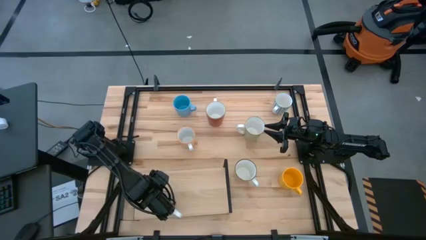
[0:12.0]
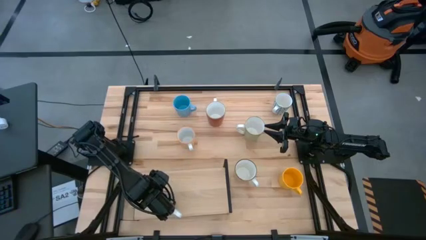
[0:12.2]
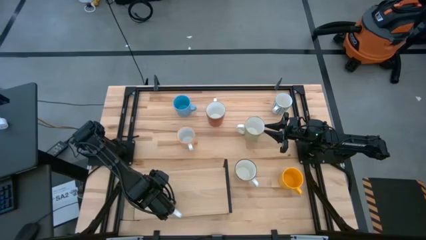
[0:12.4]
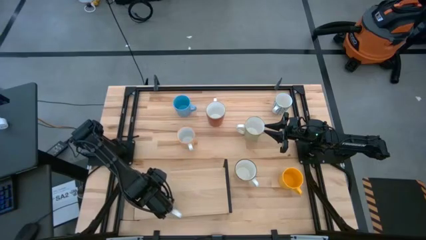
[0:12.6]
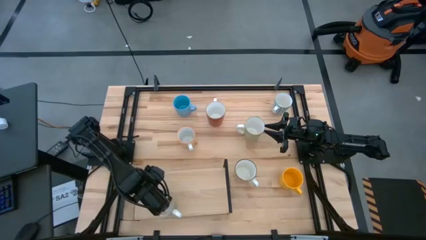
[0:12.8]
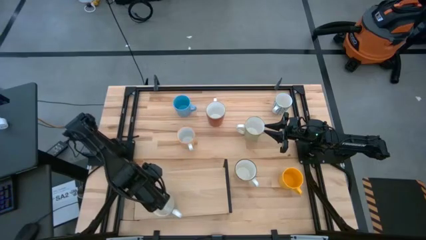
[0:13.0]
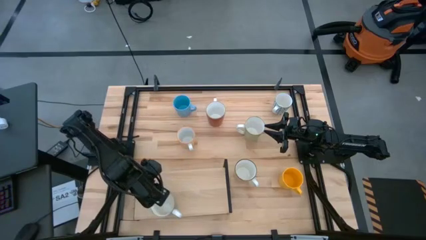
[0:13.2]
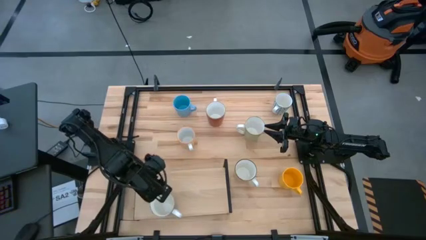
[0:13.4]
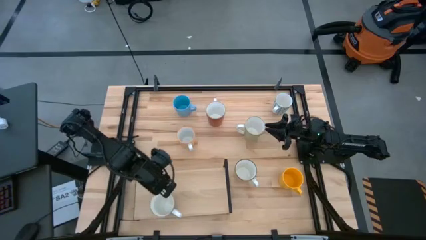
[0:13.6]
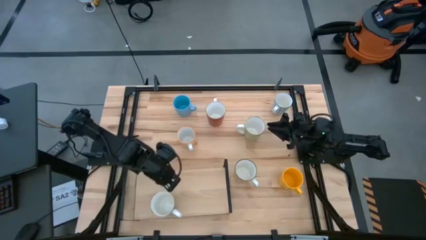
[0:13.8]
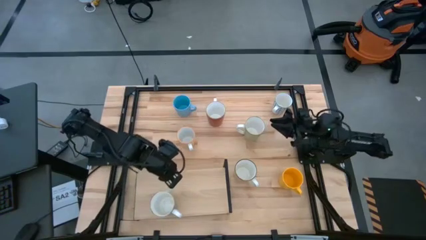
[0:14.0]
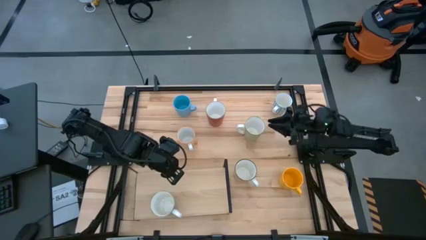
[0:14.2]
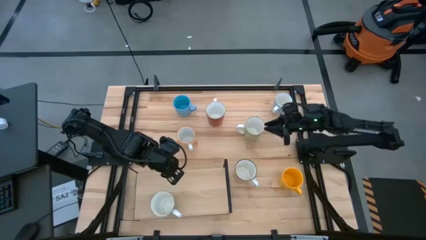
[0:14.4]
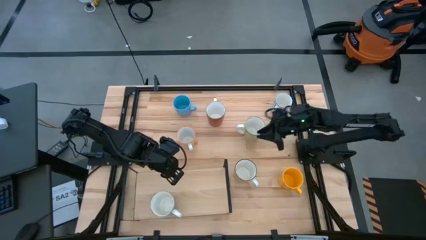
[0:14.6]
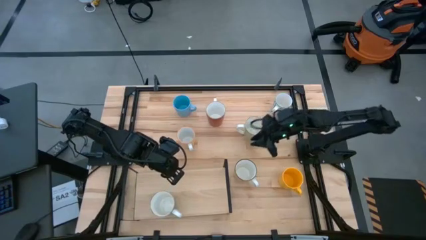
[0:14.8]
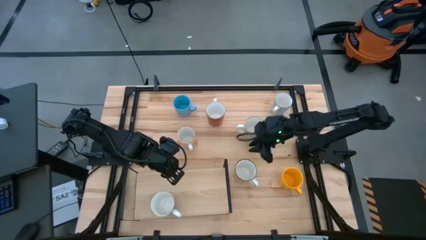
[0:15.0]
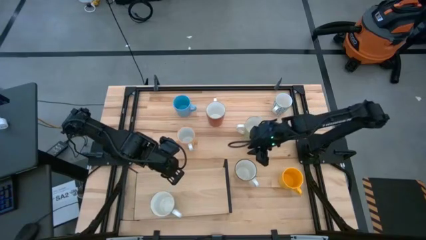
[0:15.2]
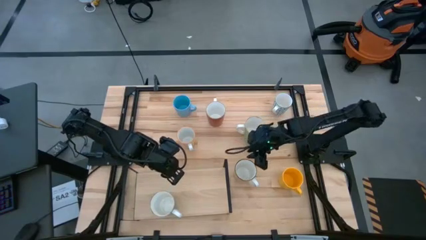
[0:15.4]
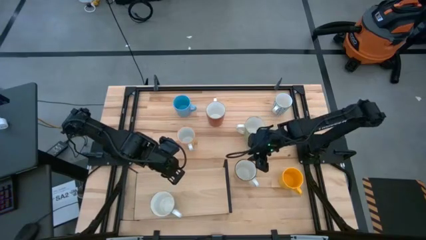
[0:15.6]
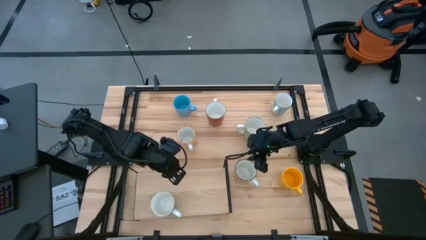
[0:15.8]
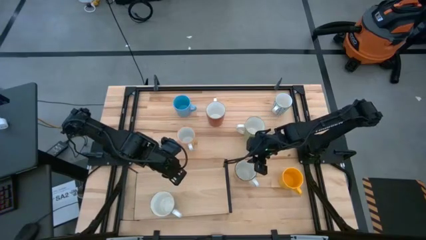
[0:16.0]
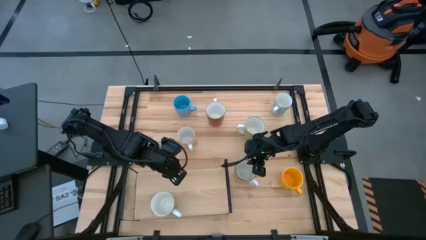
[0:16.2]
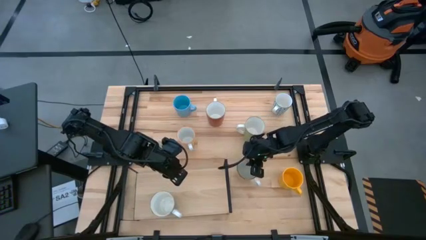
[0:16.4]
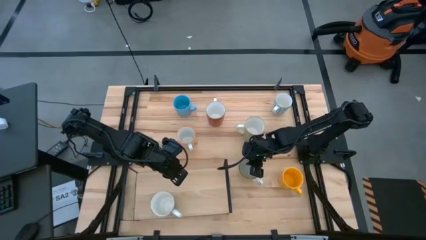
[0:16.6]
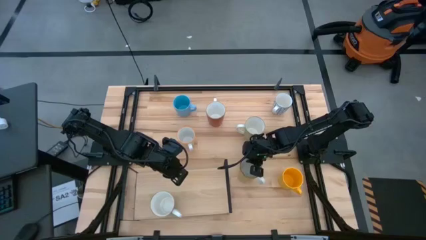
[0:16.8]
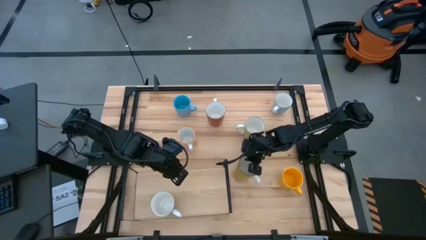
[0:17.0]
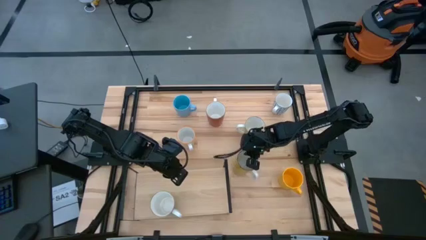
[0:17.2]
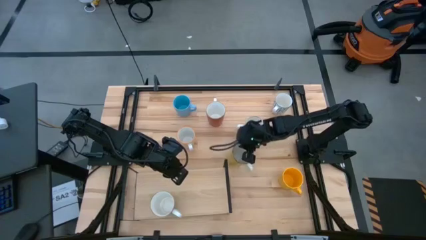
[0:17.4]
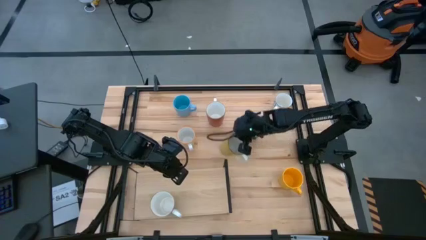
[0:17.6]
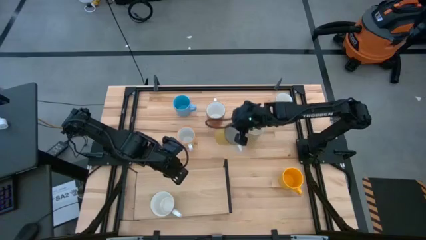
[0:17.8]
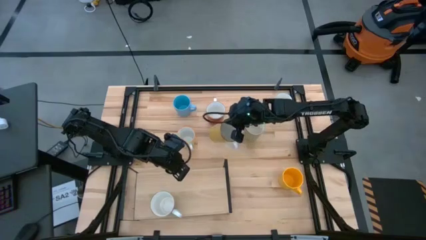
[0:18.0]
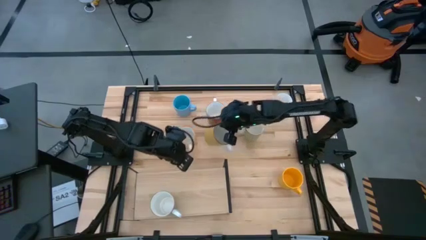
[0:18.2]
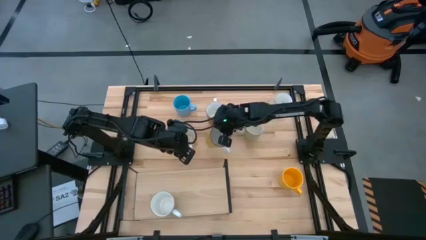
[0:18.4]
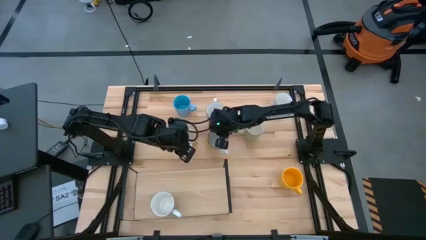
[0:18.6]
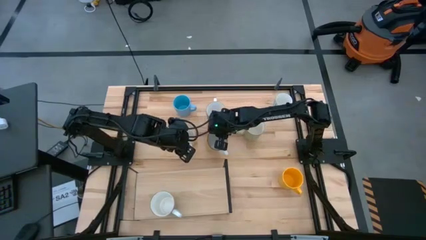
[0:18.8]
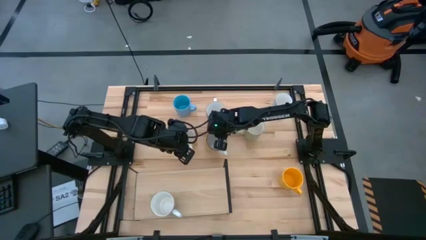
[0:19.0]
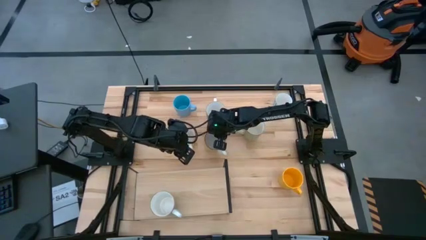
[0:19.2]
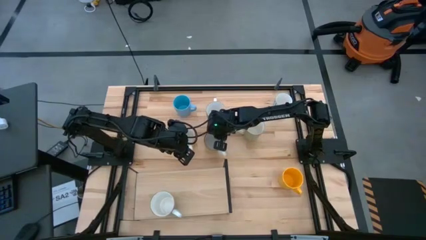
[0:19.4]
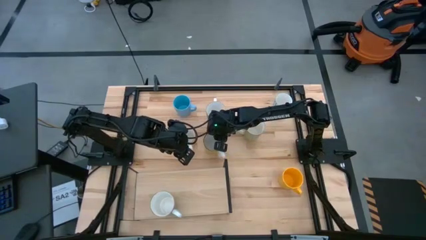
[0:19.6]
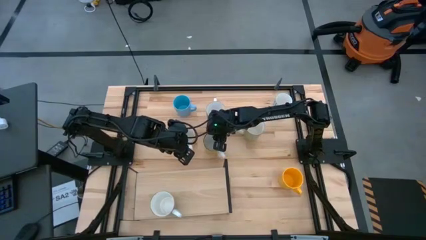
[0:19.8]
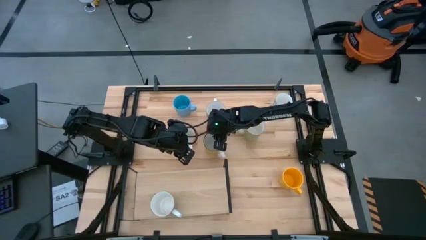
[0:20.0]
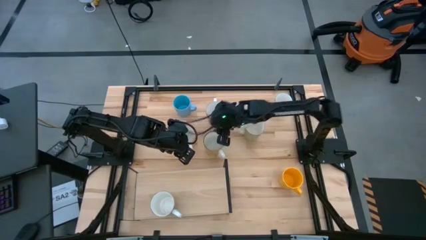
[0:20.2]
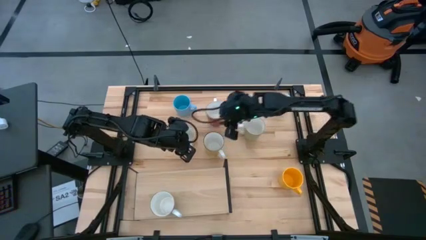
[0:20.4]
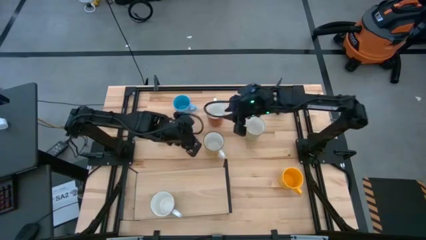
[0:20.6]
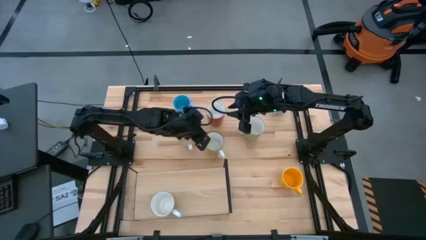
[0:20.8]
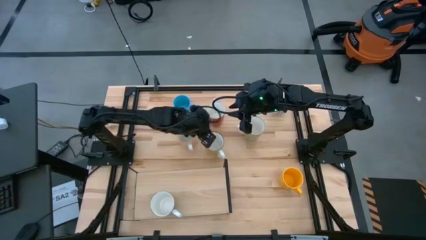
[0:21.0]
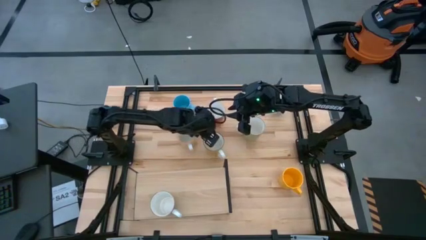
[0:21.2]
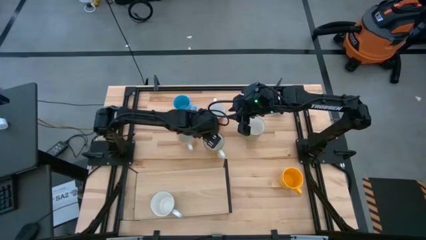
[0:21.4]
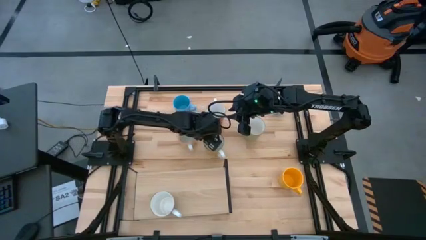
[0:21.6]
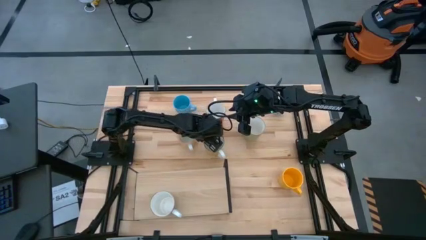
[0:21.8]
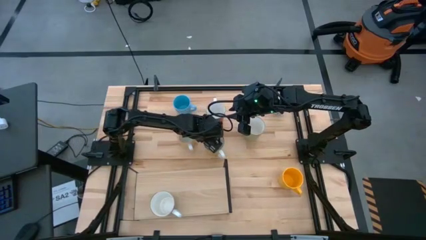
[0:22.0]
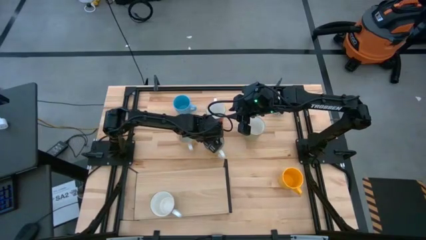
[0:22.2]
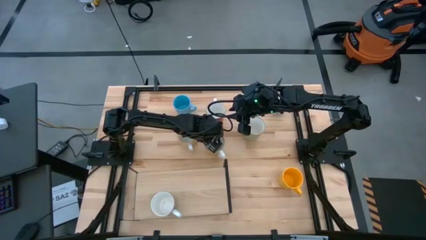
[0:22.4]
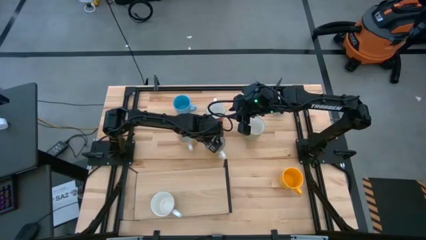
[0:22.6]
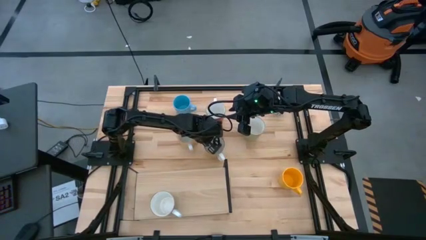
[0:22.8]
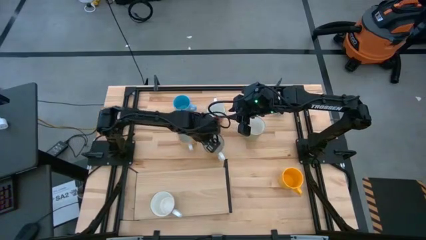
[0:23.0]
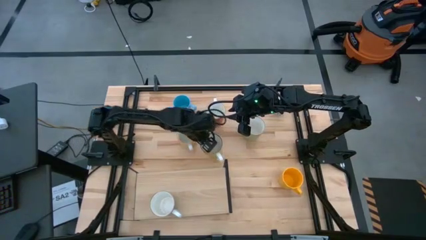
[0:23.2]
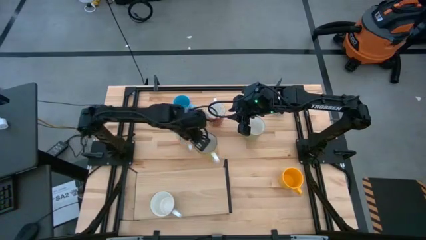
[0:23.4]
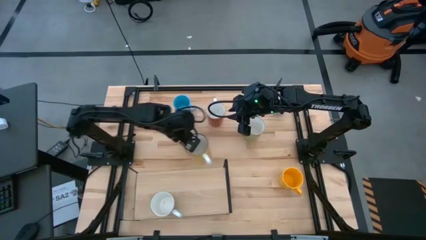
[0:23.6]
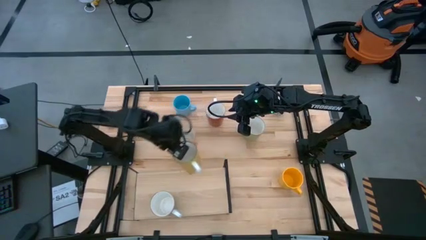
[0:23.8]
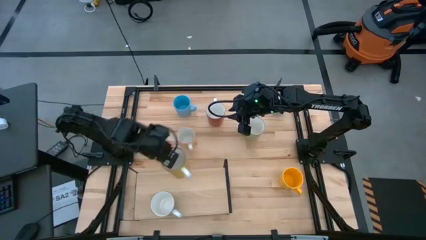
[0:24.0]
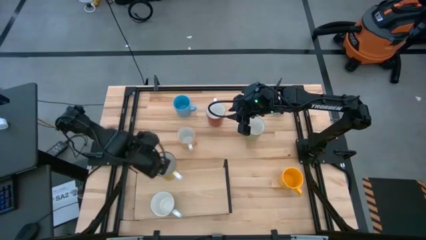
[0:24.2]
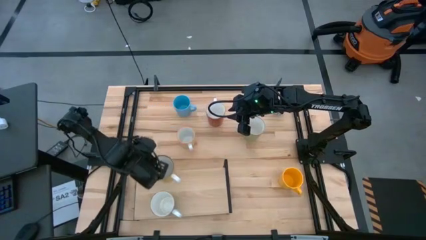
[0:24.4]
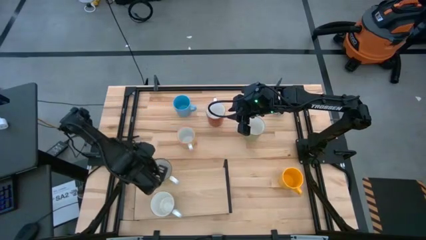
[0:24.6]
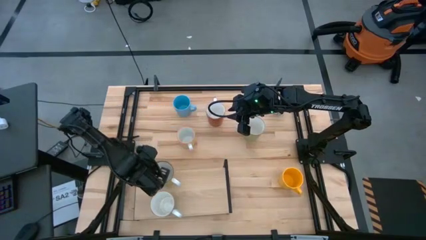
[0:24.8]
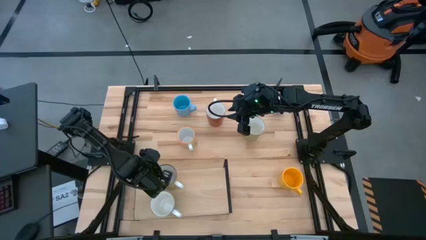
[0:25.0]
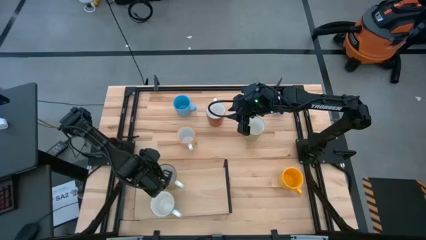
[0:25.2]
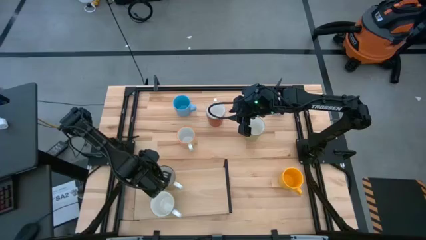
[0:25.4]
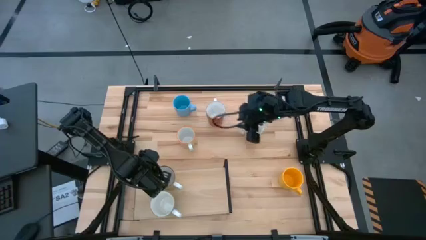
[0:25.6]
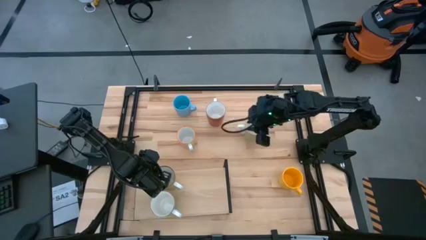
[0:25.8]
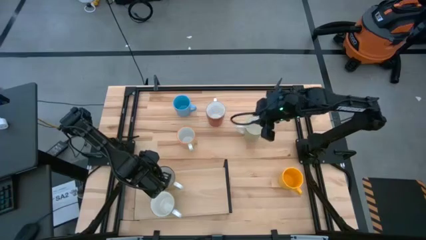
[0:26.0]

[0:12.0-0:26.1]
Task: Place coffee mugs
Put the light yellow mug on the shelf
